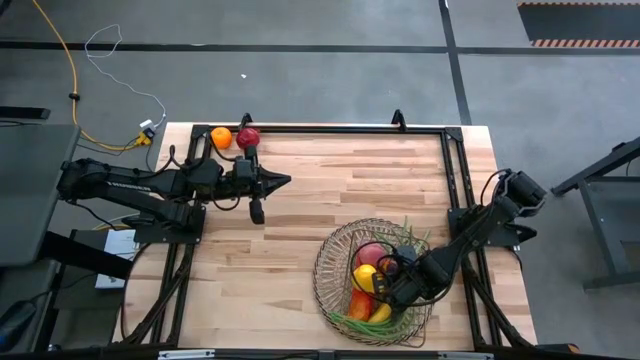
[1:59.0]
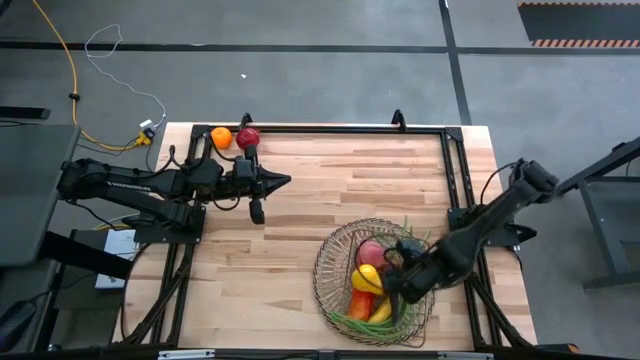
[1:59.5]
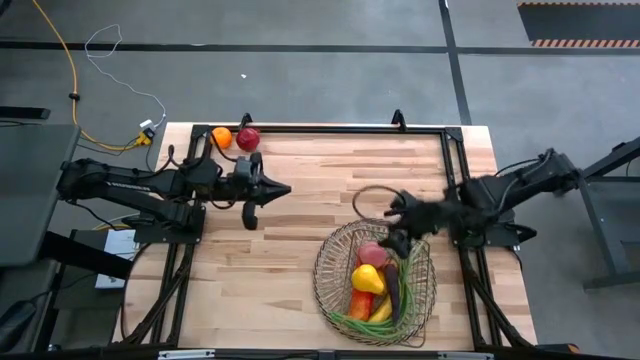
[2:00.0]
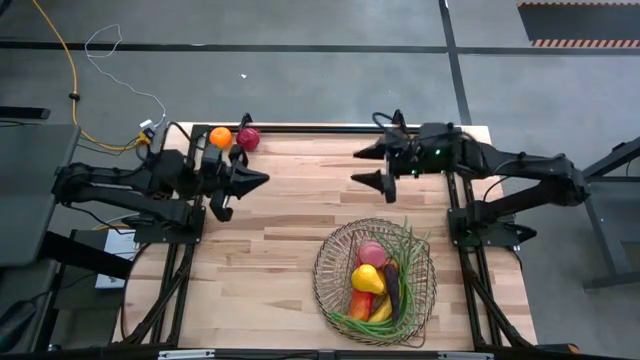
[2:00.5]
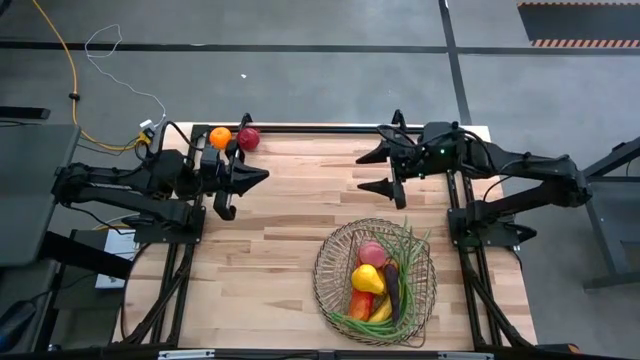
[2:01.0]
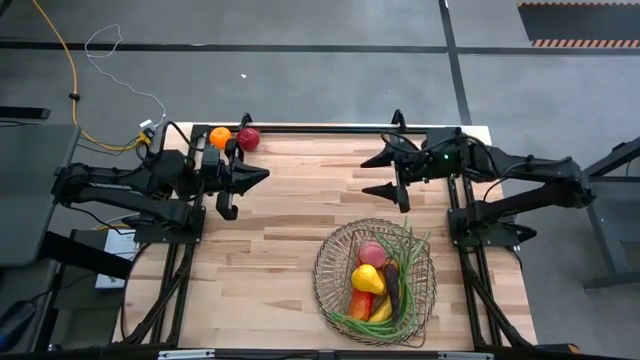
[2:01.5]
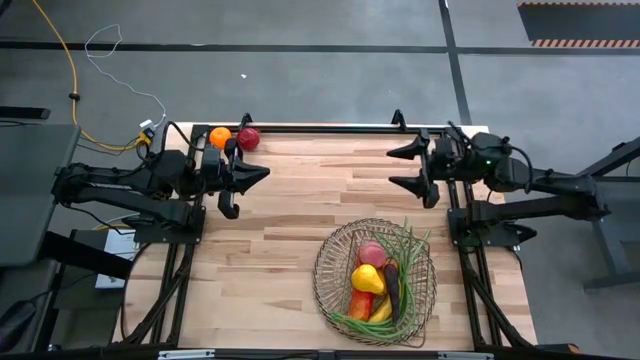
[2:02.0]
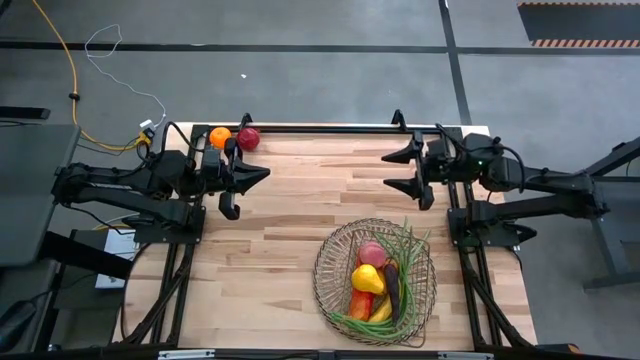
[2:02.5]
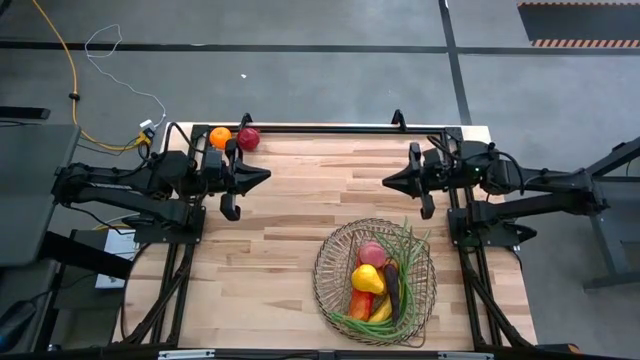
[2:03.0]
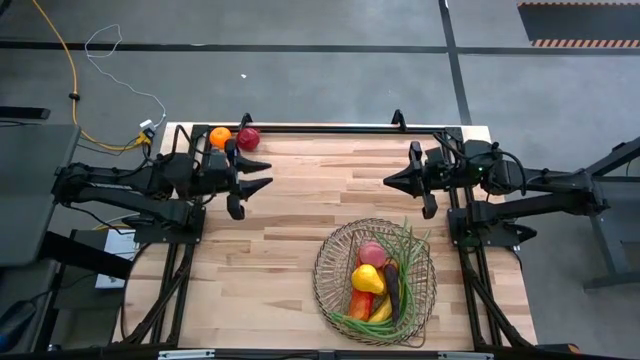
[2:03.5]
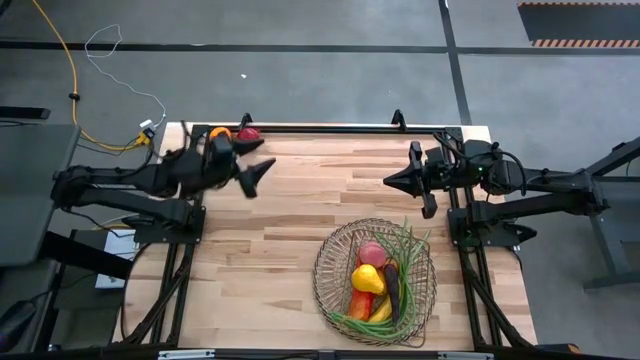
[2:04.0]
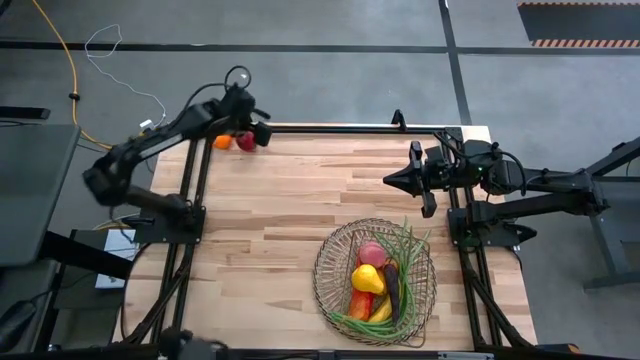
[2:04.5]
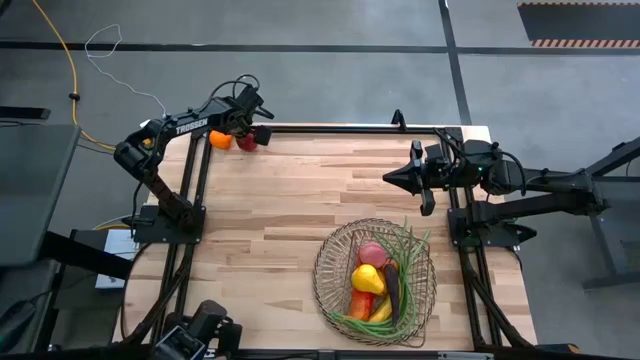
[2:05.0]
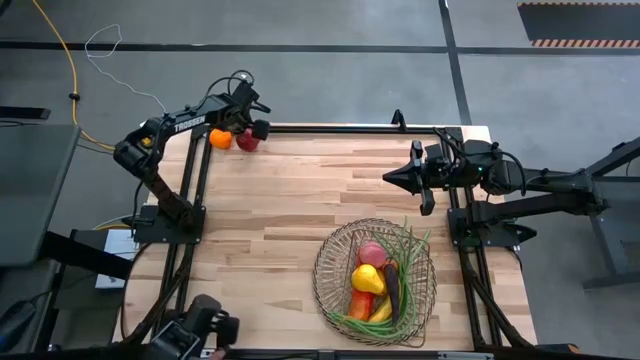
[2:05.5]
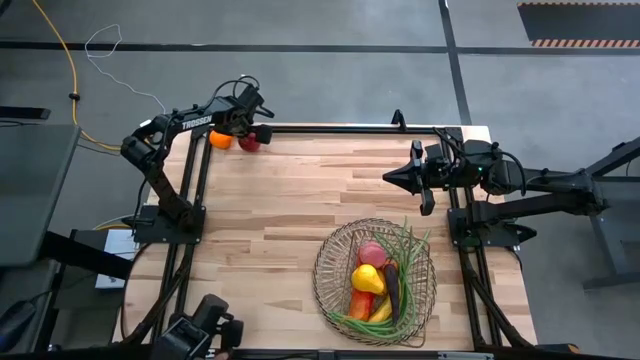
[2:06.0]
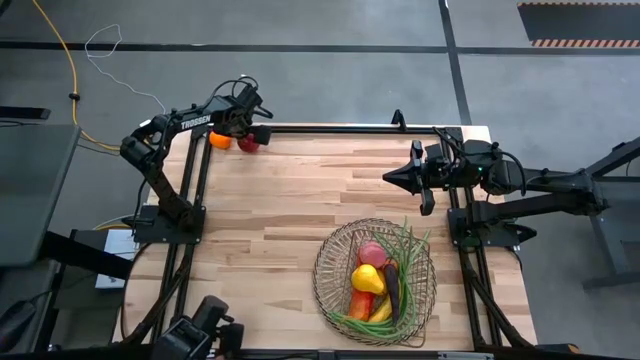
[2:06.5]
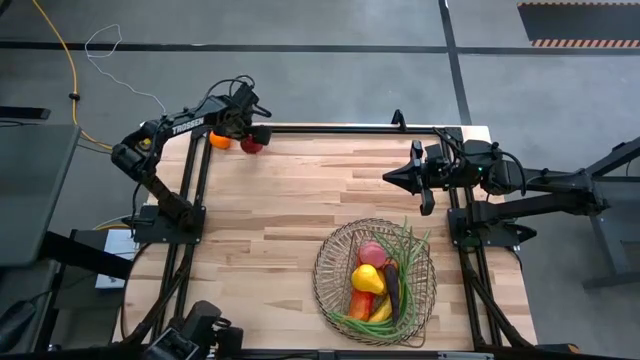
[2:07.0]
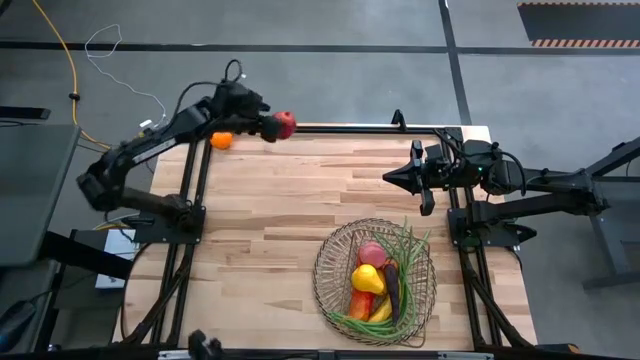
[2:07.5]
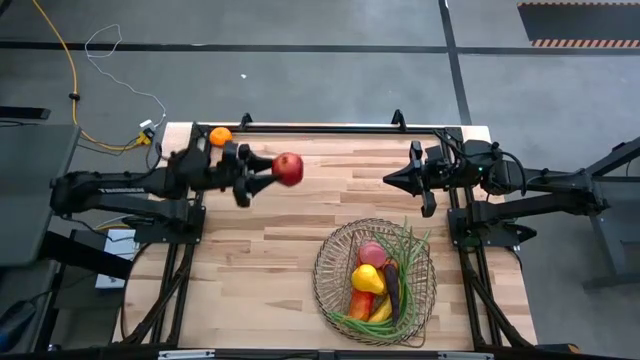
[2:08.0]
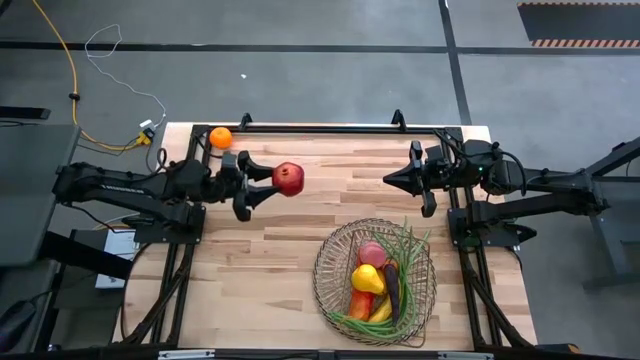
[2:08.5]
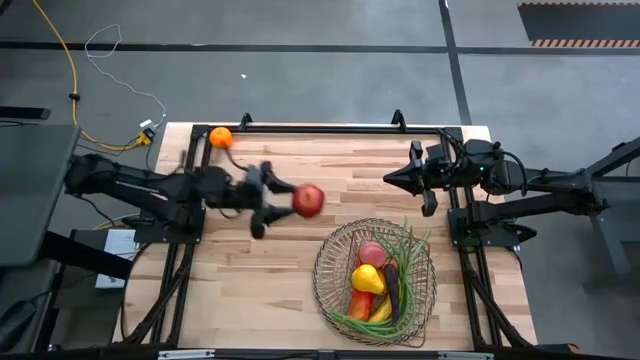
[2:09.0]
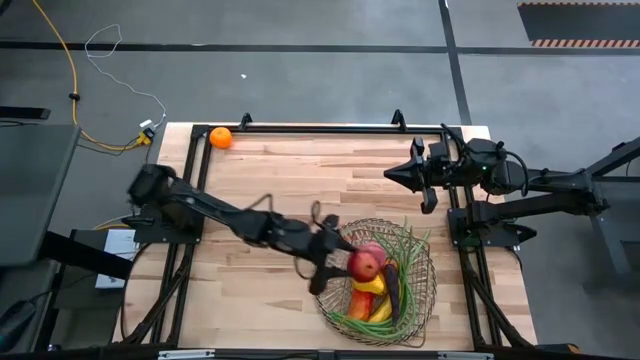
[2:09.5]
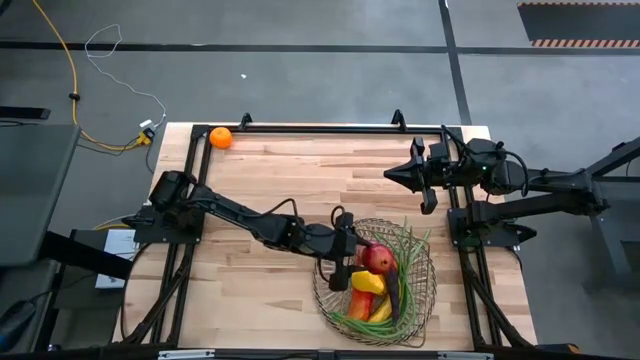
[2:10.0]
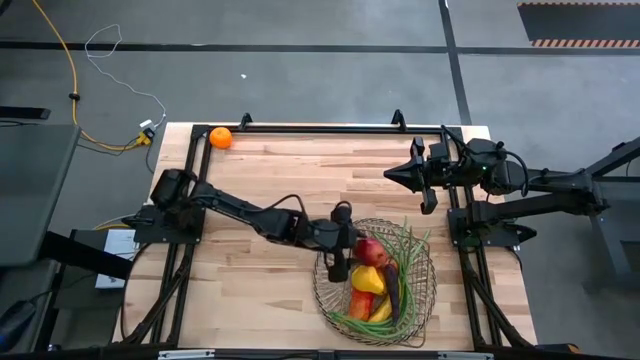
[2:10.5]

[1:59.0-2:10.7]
Task: Build produce basket
Put the red pomegranate into the wire basket

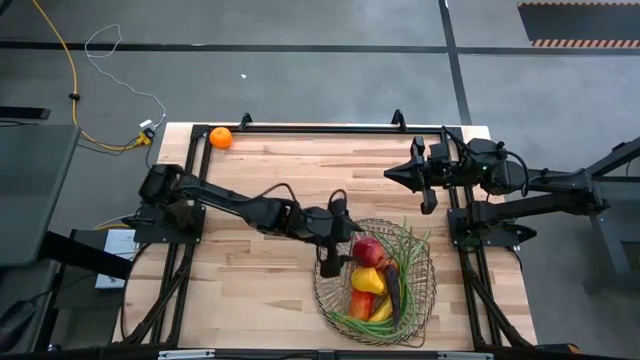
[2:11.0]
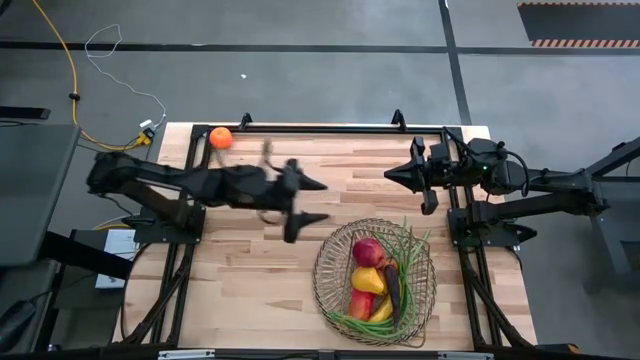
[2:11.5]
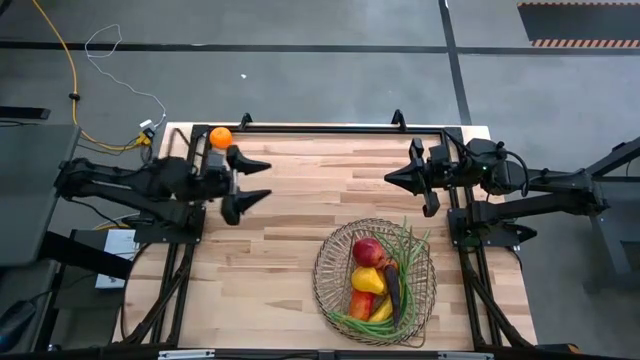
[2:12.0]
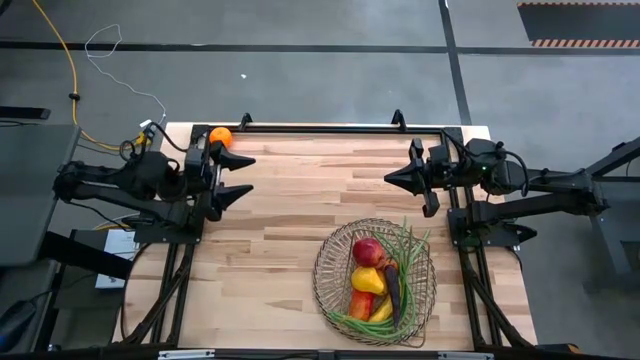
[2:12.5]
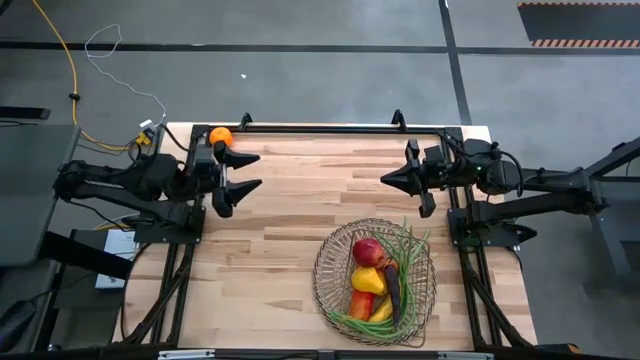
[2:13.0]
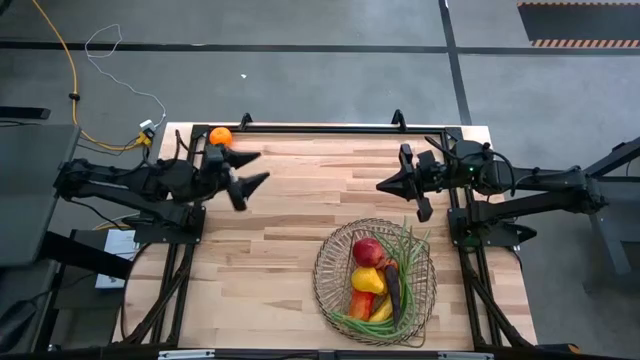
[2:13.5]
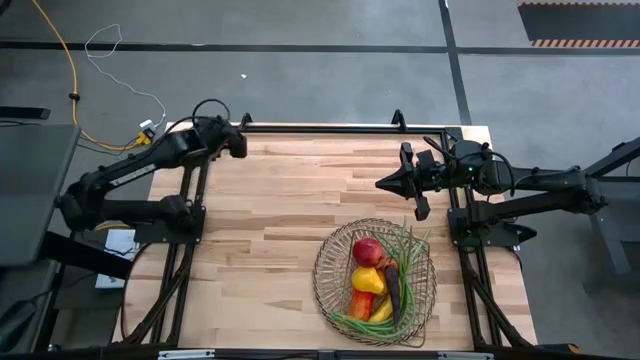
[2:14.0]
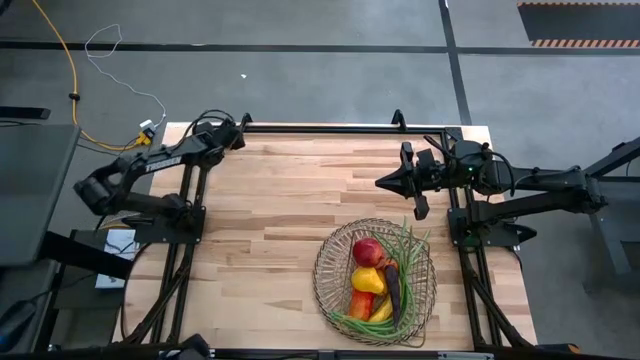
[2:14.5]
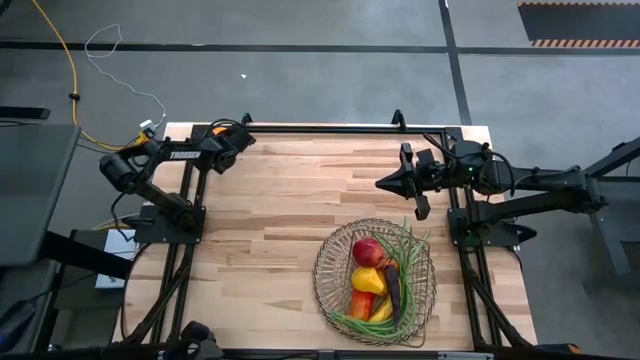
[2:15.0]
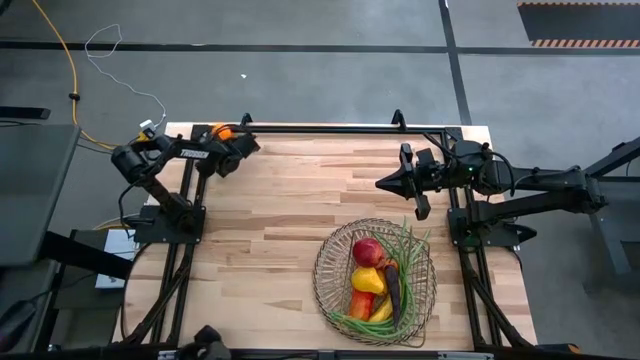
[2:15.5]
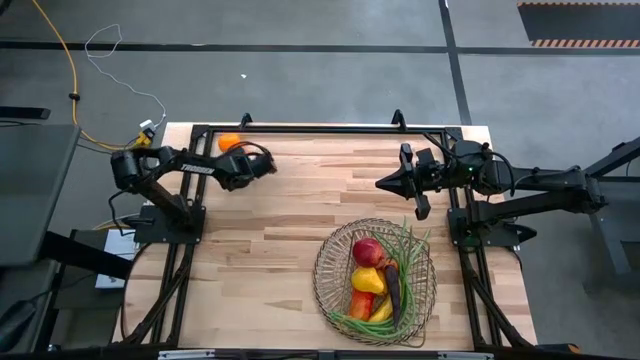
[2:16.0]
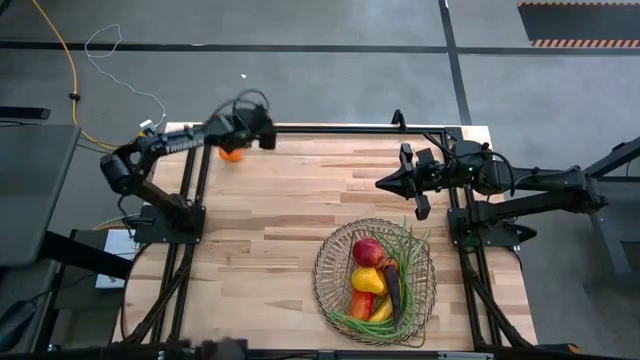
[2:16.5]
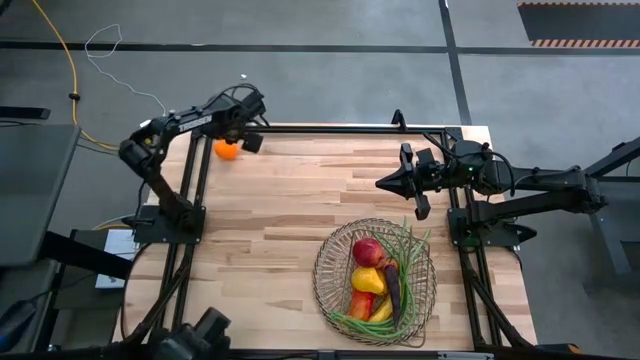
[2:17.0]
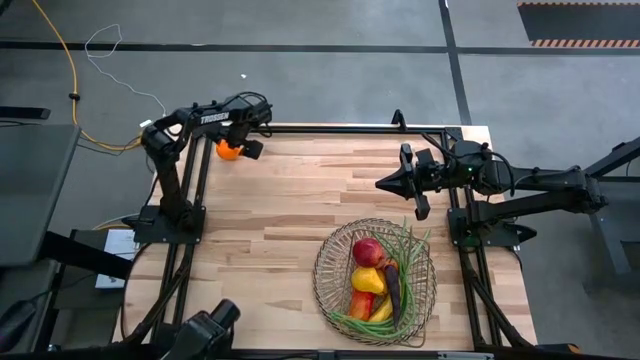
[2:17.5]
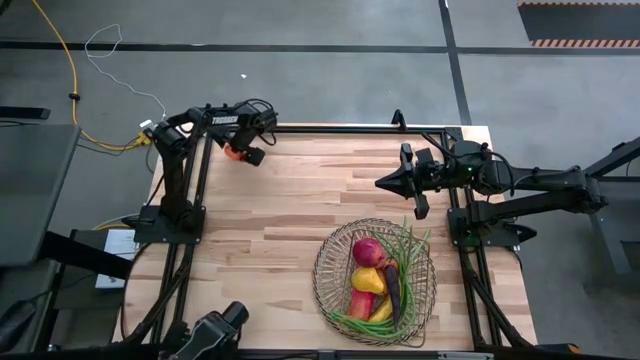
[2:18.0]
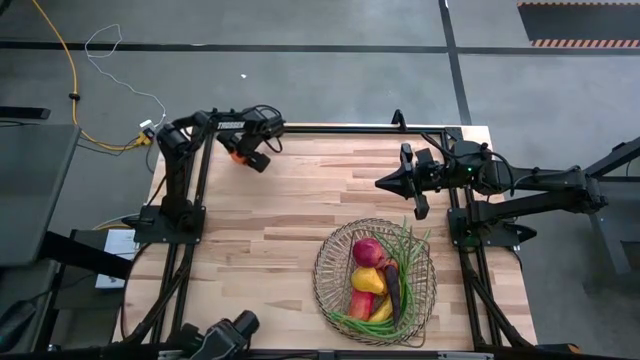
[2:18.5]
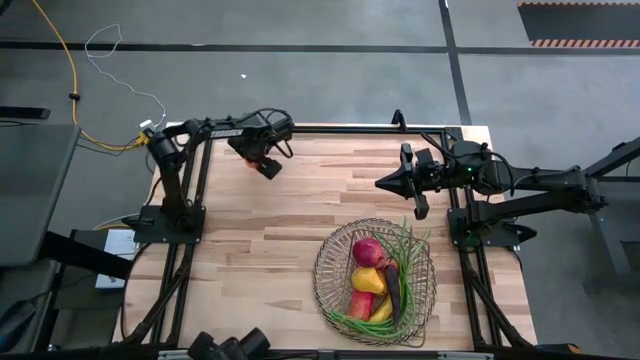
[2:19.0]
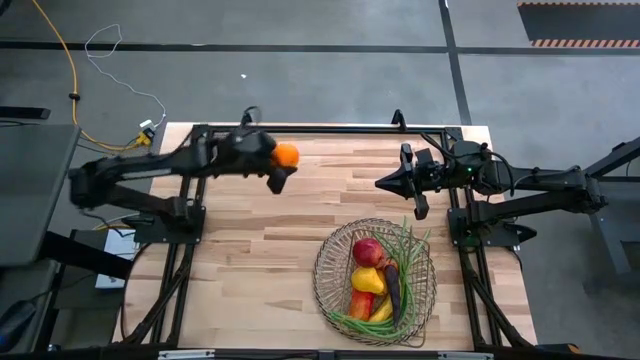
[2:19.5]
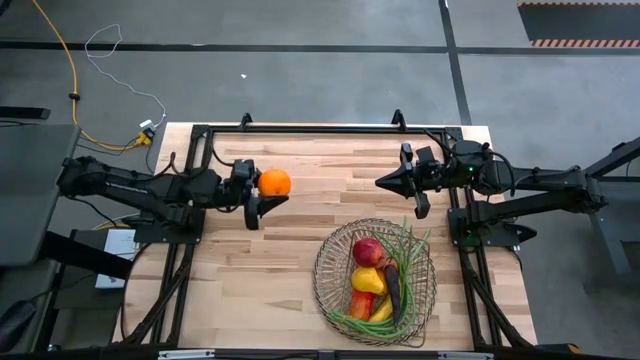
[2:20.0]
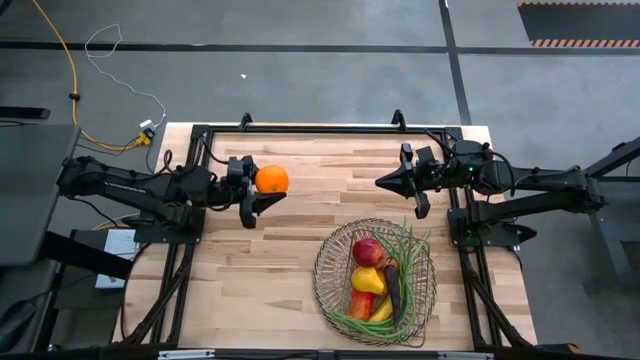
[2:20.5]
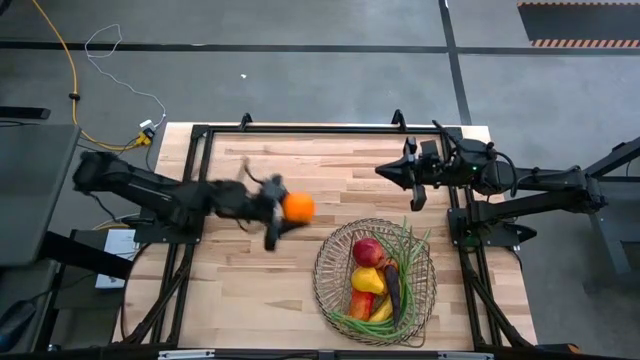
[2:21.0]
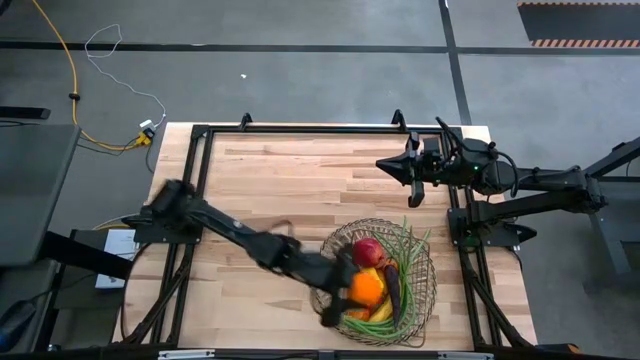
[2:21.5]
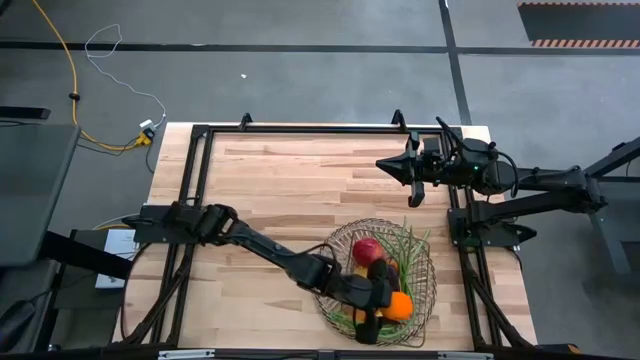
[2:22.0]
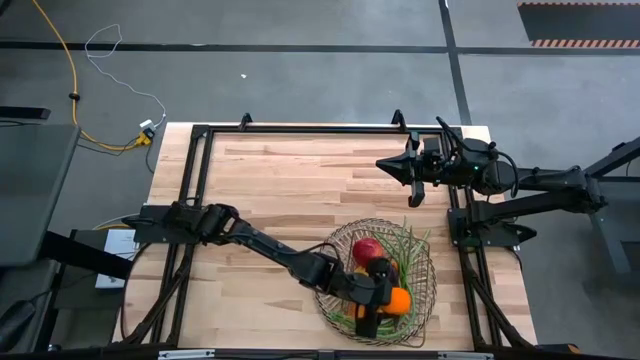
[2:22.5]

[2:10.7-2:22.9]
Put the orange into the wire basket
